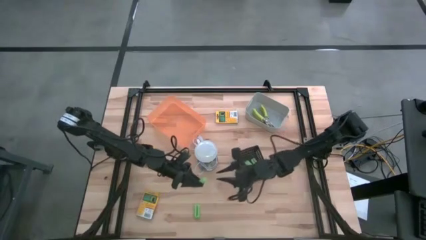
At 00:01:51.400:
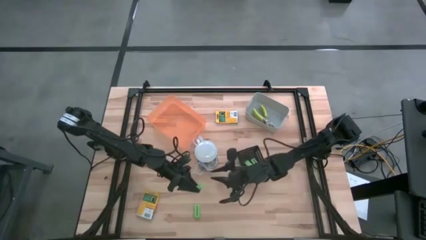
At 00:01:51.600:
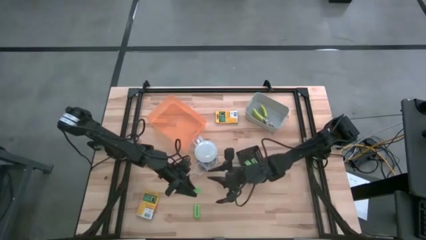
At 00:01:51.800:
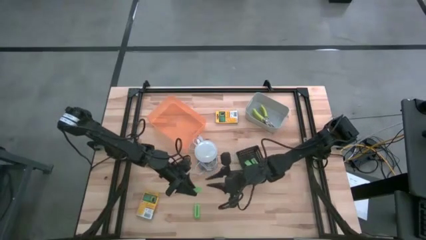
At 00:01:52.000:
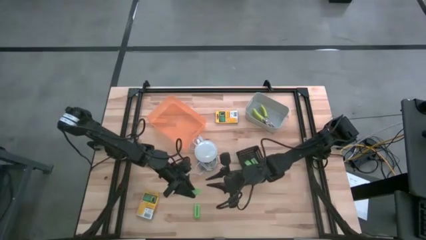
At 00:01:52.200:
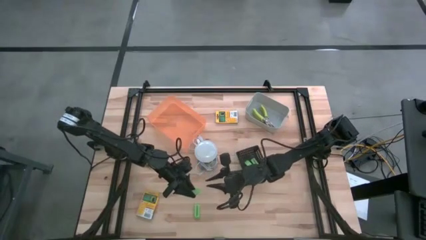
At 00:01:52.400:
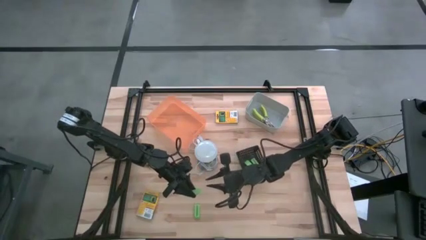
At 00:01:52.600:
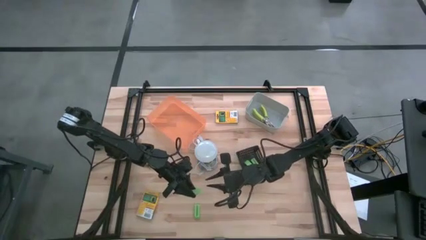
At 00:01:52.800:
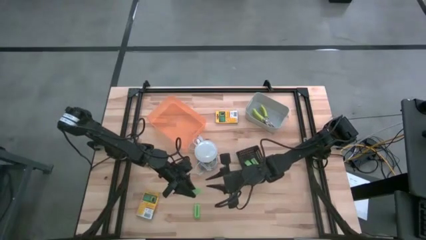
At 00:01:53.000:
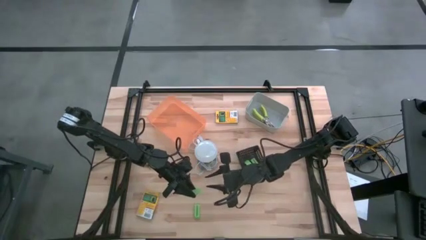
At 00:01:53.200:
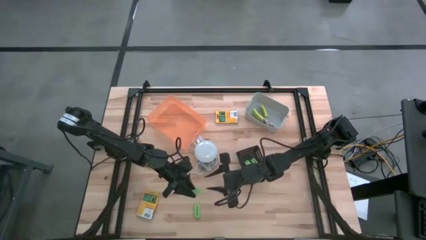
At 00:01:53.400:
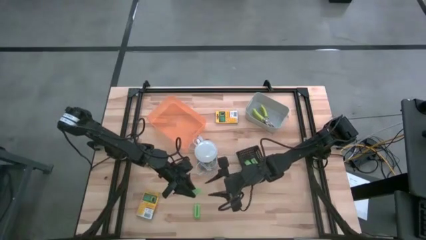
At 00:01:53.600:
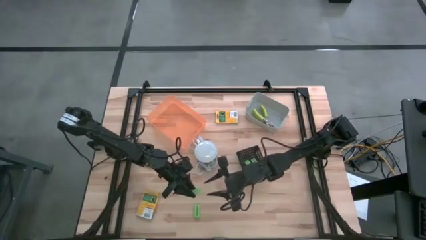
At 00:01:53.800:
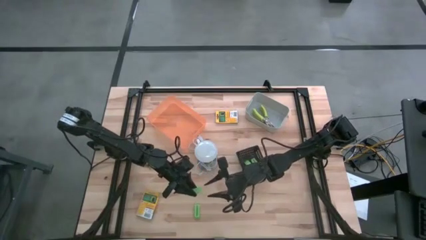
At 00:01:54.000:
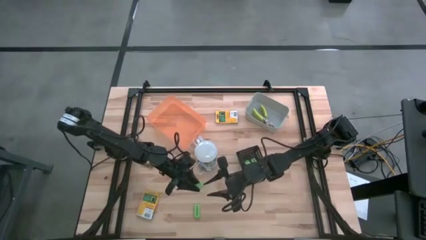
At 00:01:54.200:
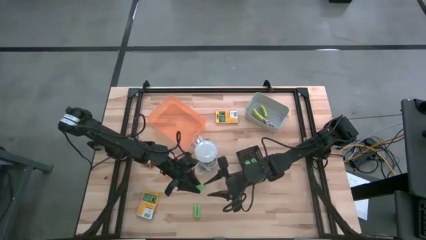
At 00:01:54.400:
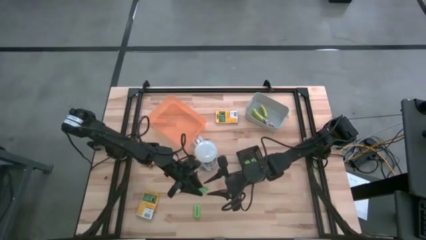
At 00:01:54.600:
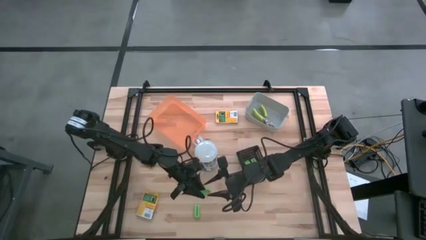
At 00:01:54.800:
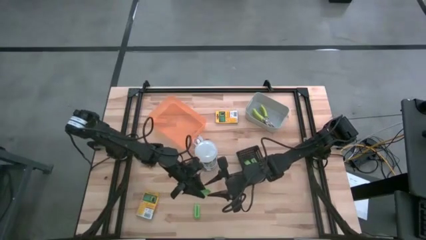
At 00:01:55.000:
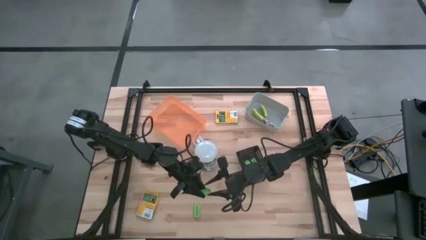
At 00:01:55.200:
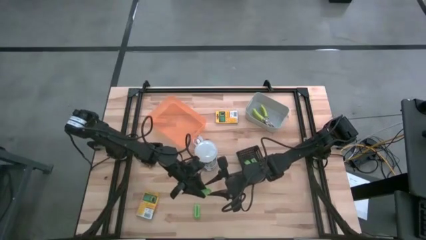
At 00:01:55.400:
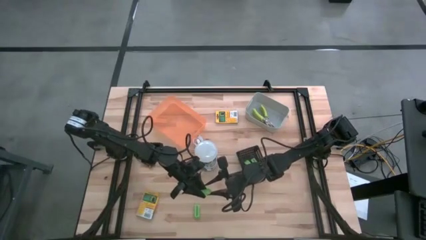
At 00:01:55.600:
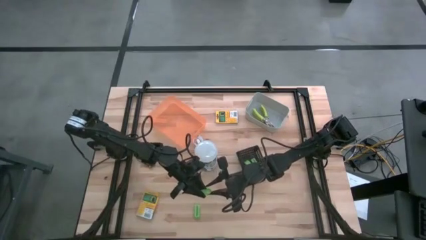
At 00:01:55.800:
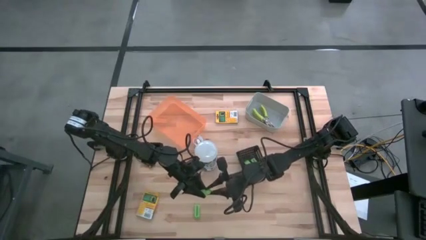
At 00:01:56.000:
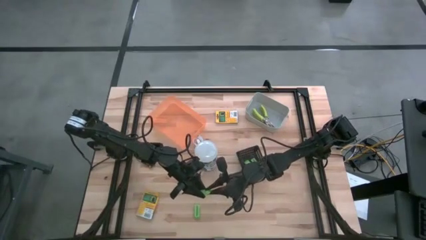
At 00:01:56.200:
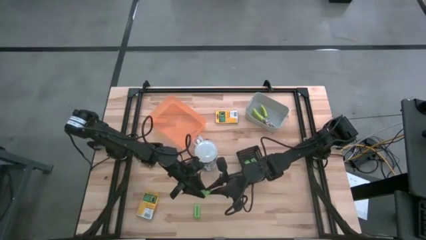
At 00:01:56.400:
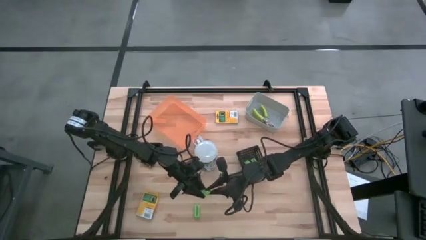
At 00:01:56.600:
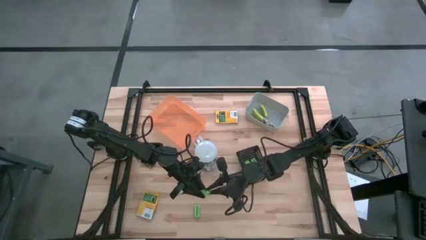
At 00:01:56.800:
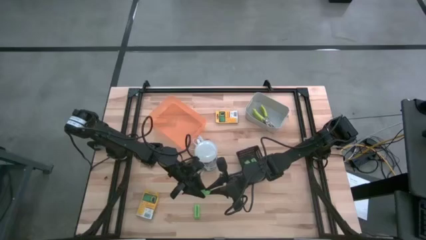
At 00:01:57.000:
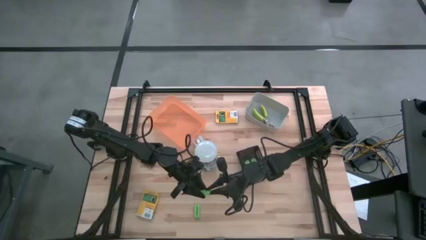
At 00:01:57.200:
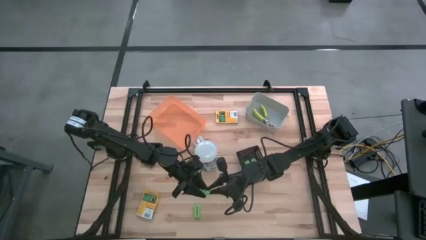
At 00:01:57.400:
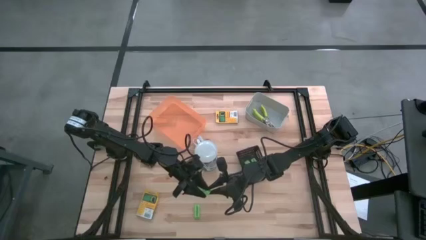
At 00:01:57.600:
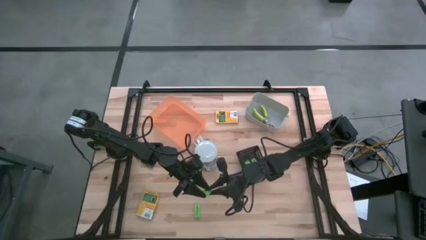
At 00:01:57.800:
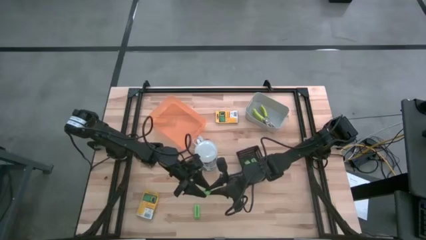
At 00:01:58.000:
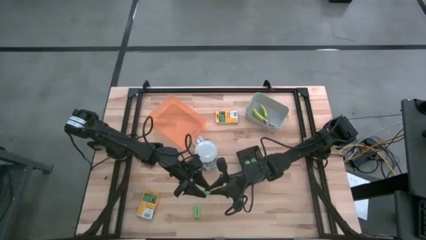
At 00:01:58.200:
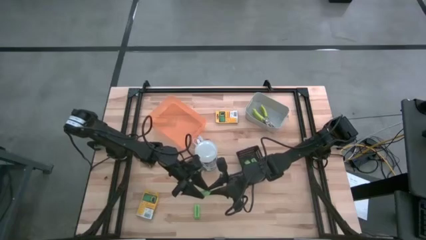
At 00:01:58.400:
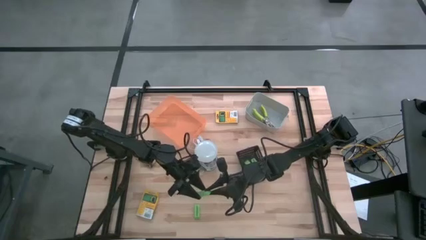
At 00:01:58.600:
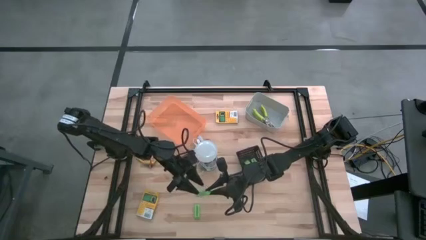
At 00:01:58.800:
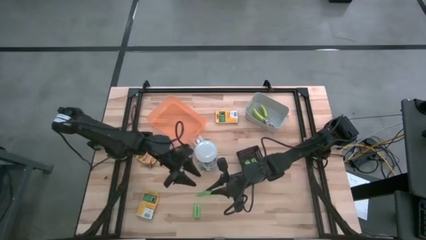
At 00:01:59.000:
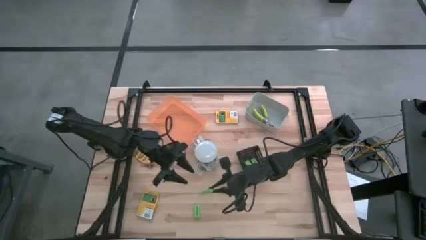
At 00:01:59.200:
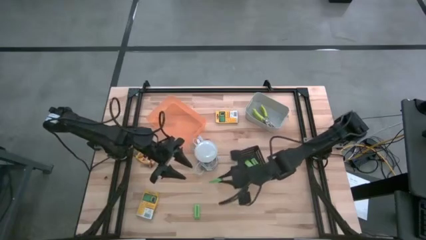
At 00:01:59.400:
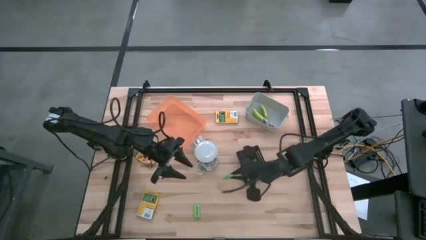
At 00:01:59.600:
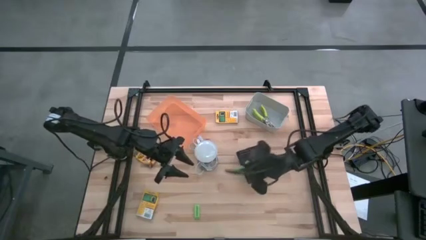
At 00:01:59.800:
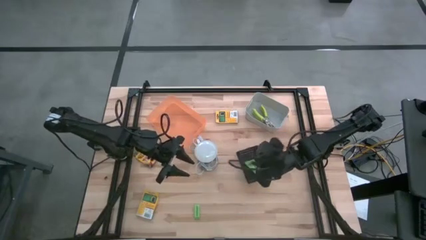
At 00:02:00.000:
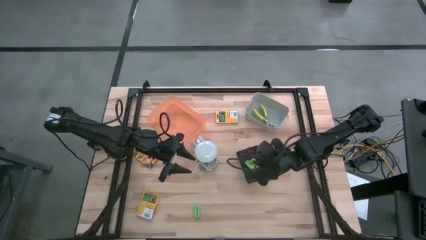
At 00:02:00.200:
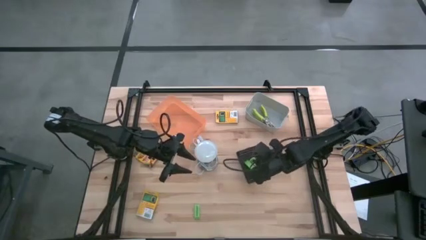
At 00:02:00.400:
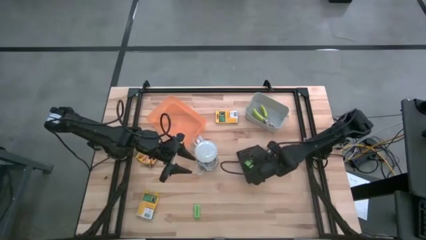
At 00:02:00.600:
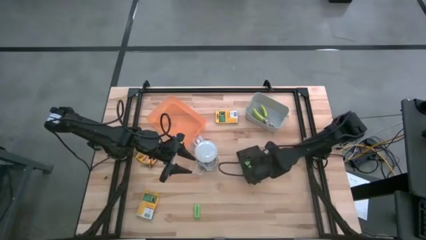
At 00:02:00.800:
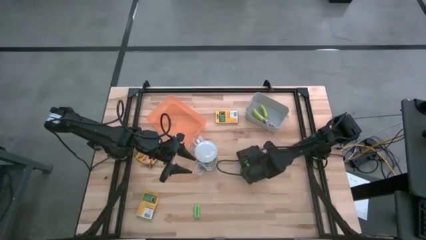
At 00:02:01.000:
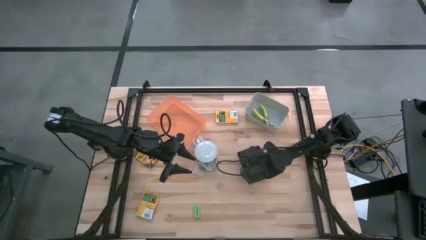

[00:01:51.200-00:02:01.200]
Task: Pick & Place School Supplies
Put the green eraser into the black bin

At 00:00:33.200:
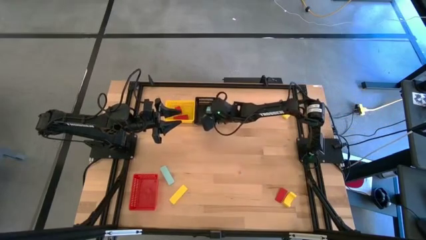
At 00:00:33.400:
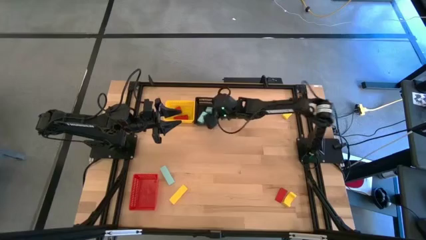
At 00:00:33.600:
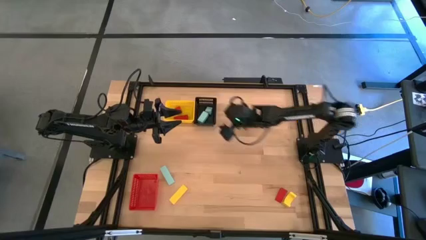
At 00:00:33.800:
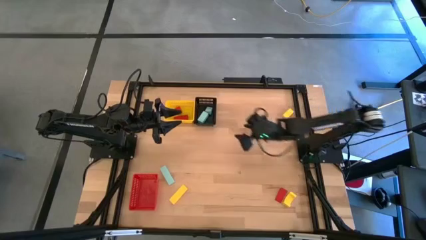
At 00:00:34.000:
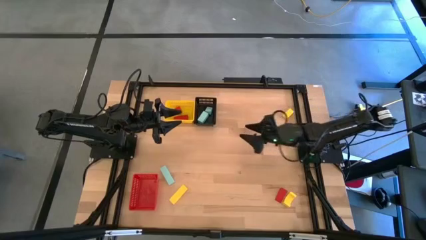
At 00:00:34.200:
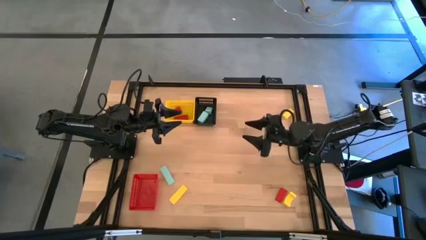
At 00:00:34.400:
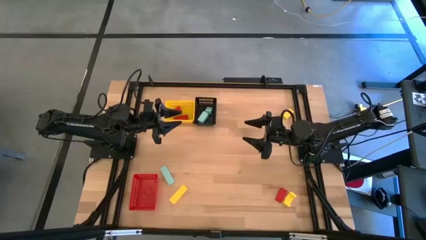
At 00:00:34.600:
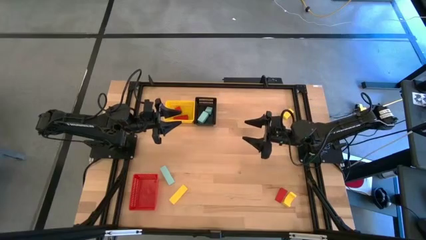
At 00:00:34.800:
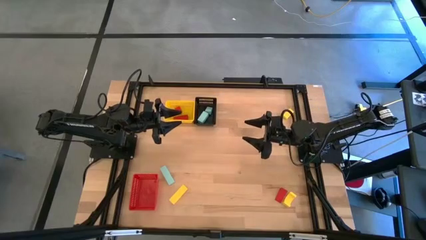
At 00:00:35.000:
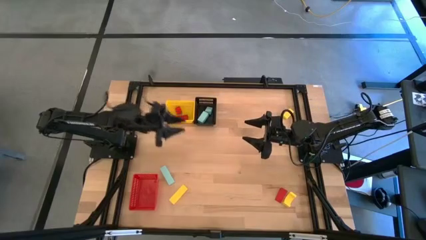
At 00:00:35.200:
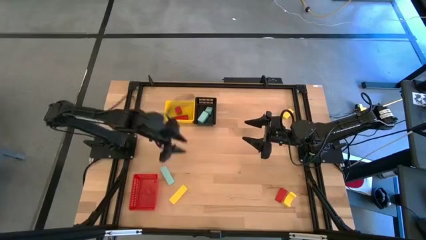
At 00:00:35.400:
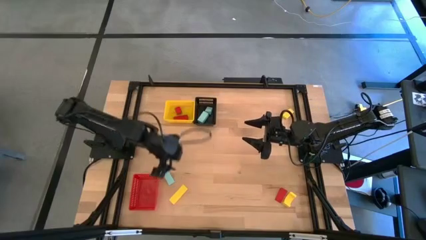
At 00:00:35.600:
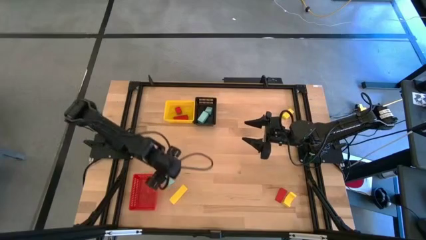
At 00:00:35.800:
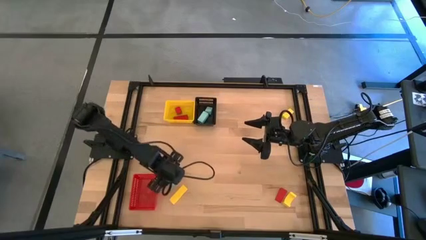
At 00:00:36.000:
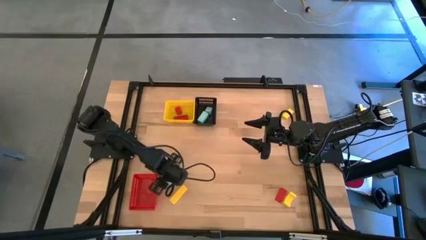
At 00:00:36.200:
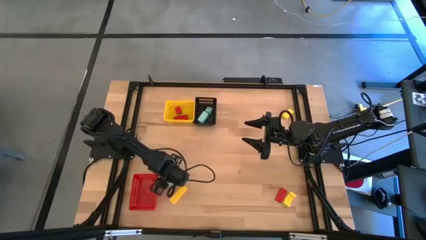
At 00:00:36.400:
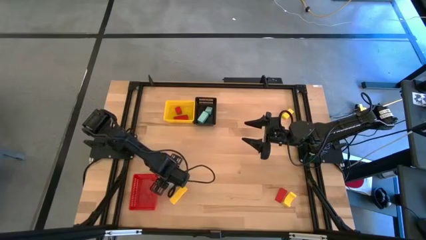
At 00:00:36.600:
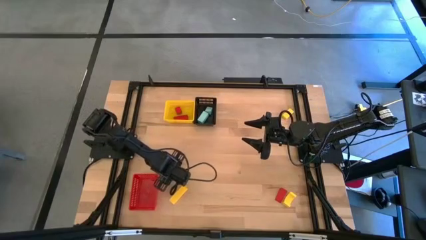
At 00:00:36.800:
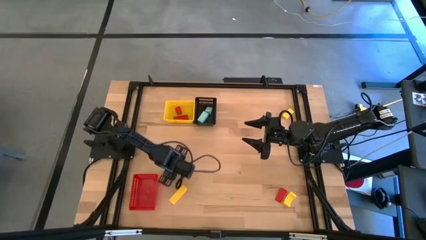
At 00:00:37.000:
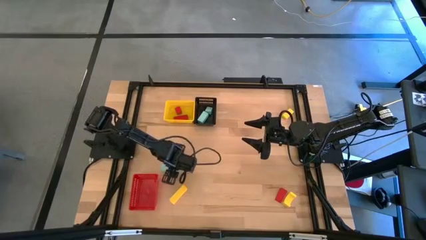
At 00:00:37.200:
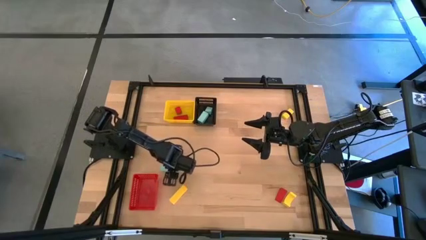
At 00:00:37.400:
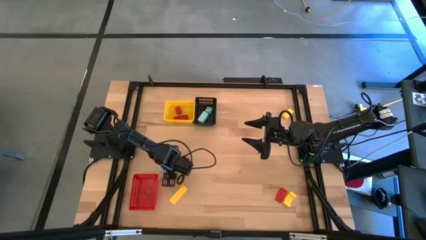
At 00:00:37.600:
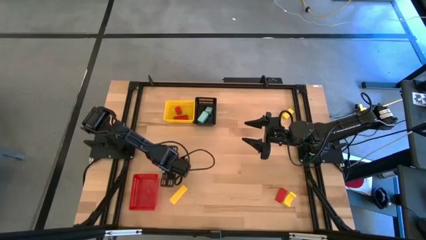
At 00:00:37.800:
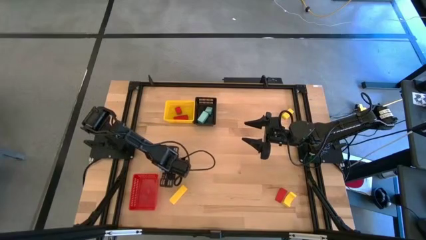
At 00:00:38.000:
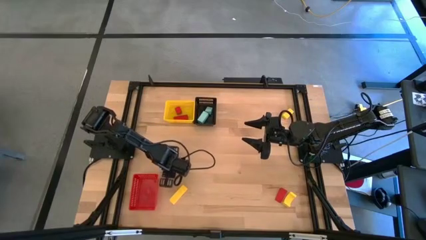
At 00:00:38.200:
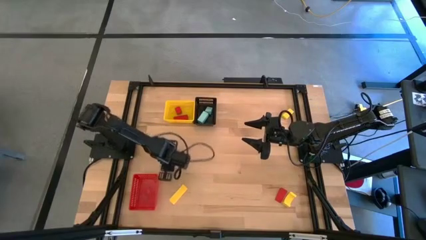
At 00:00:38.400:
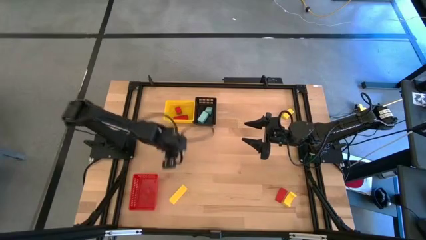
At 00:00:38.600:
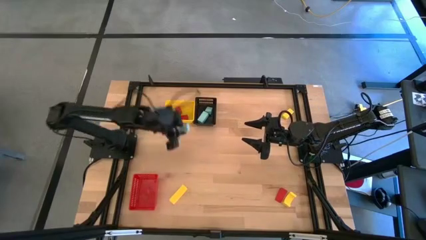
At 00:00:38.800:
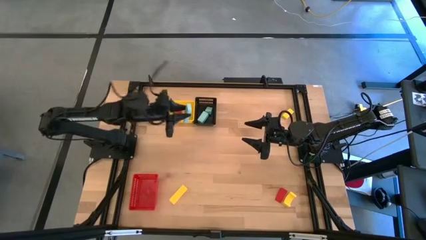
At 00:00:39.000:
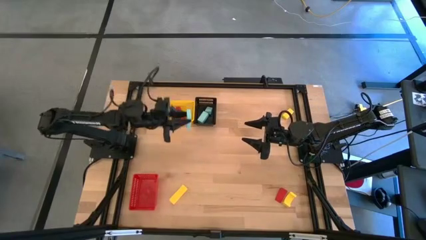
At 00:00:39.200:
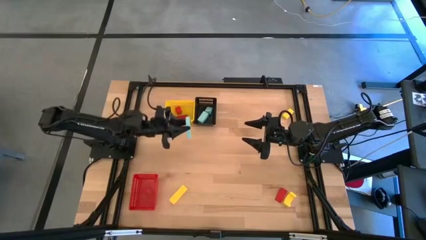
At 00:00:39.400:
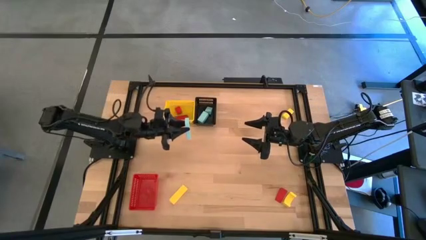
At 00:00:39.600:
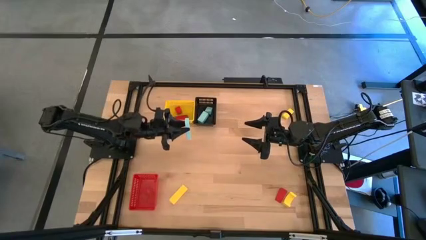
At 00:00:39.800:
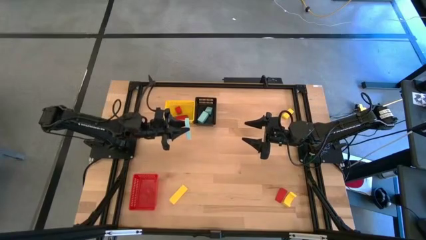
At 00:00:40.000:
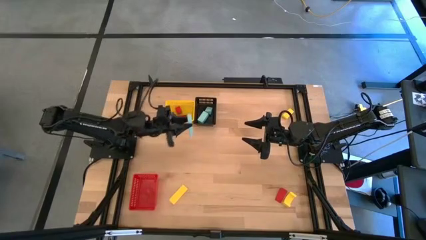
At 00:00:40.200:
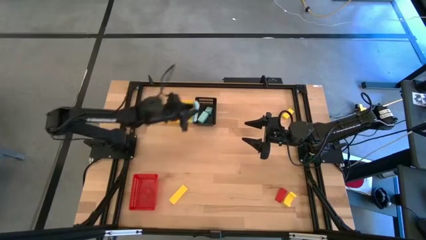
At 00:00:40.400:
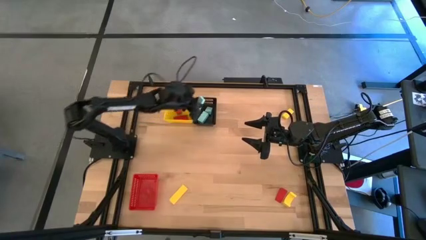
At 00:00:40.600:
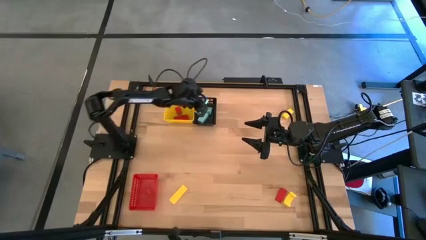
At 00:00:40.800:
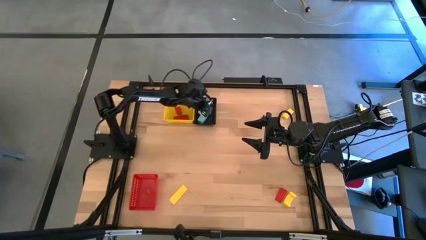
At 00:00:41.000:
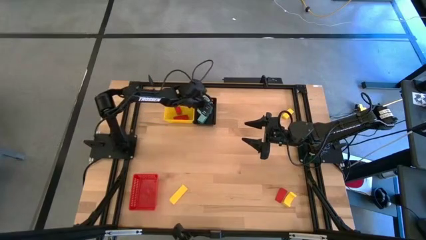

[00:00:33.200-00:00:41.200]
Task: Sort & place blocks by color
Put the blue block into the black basket
